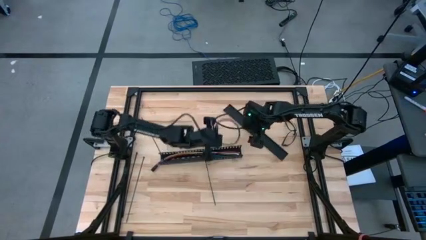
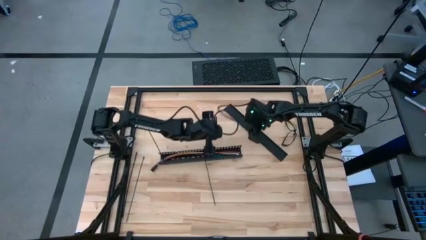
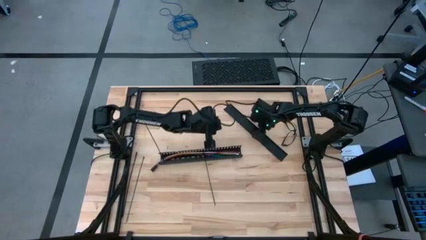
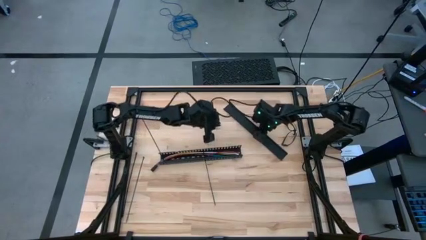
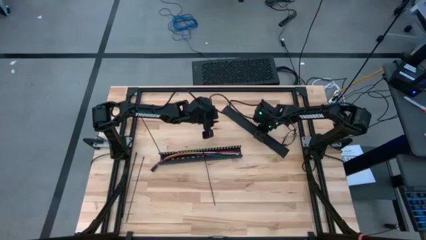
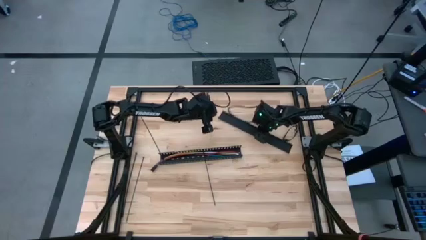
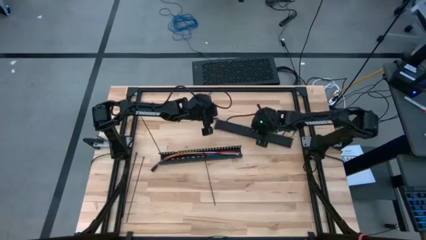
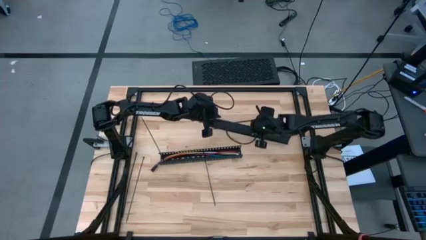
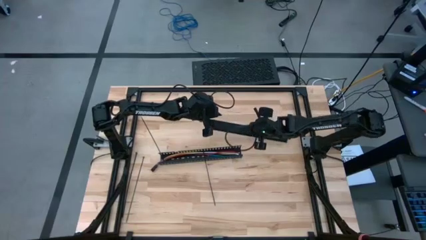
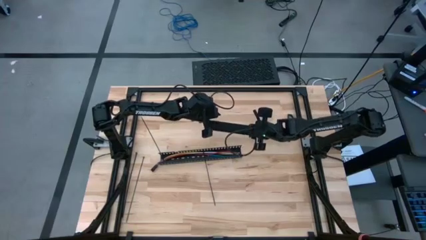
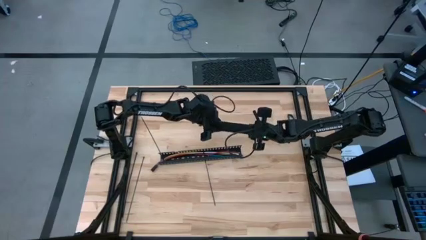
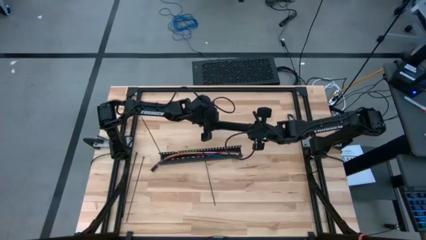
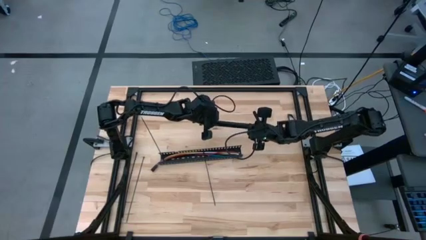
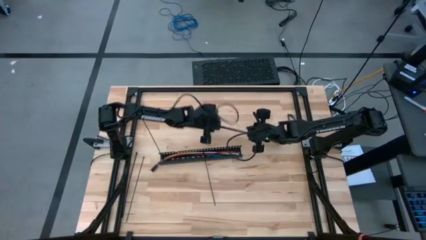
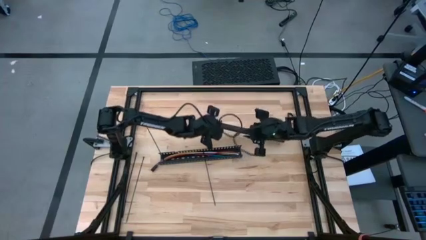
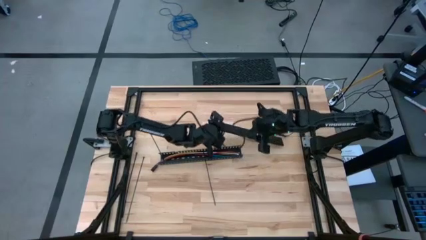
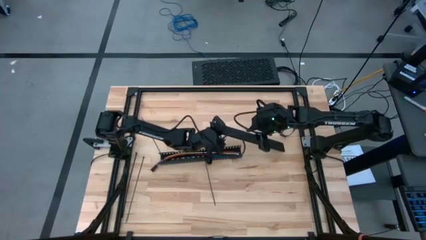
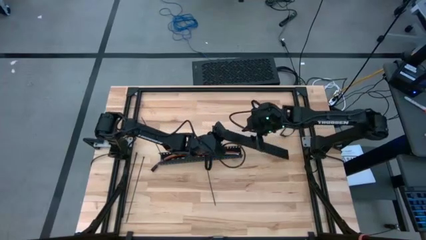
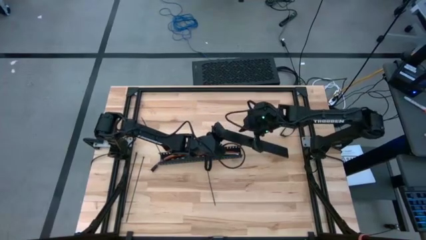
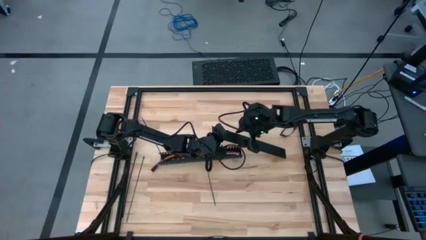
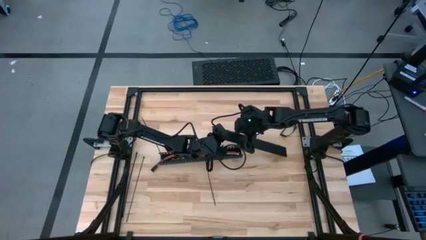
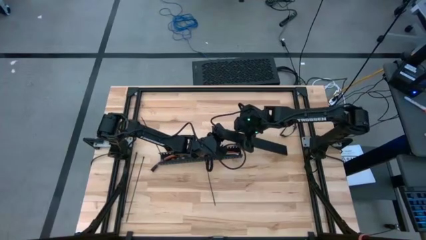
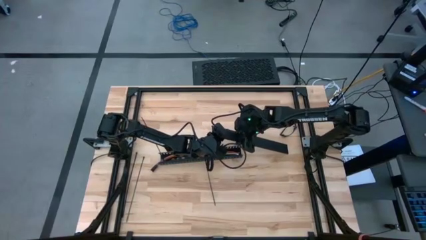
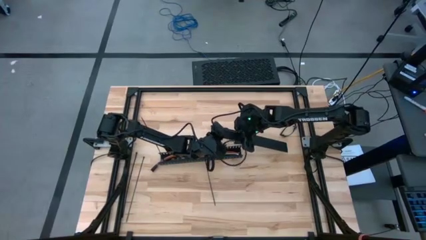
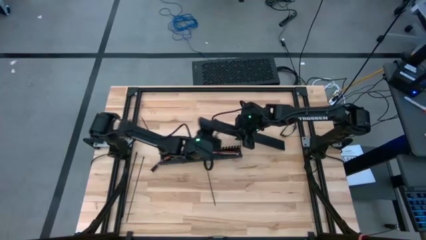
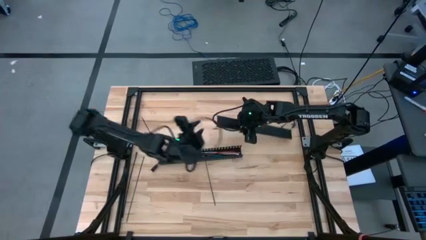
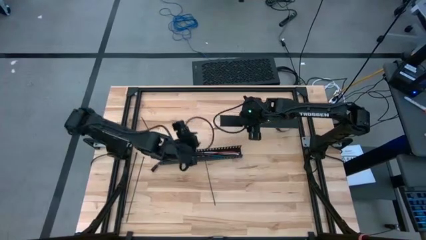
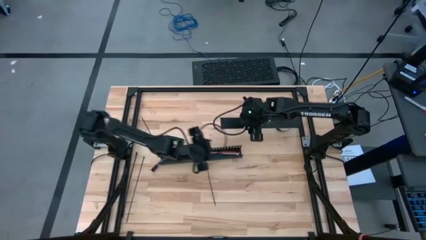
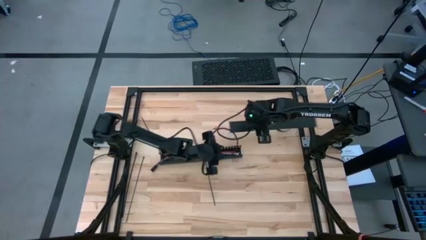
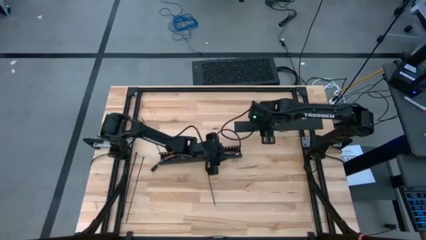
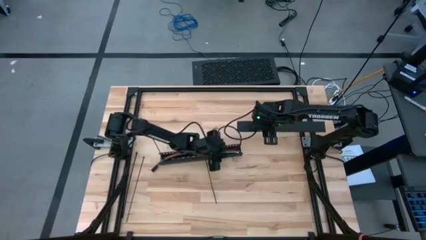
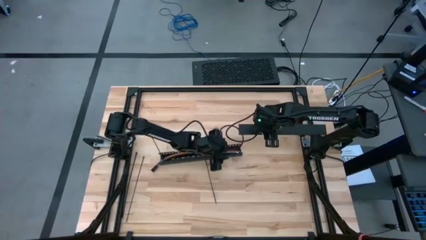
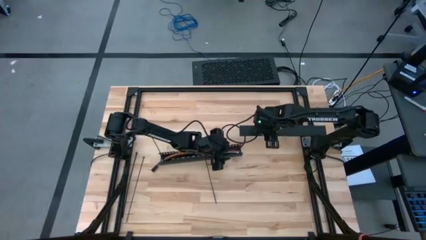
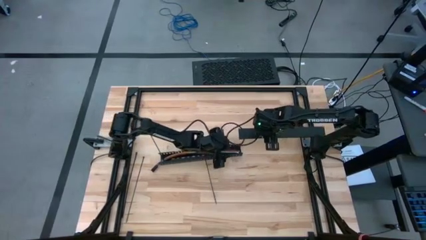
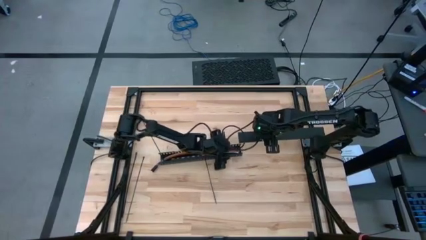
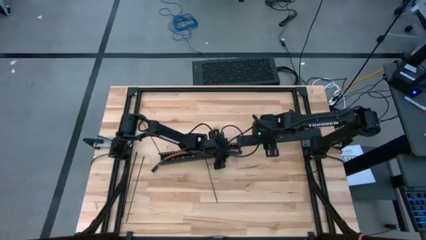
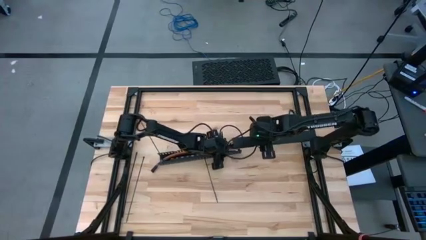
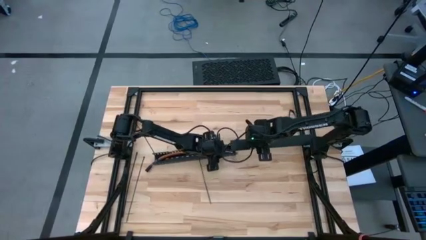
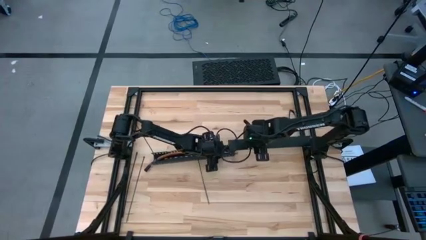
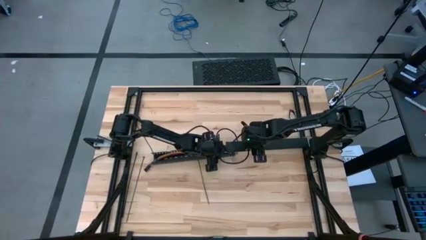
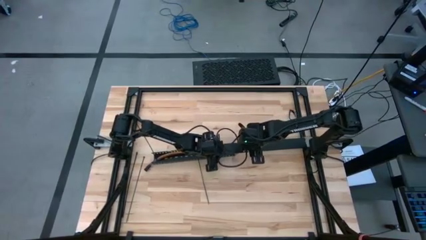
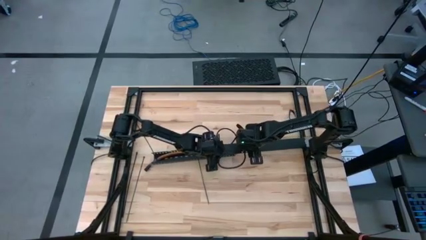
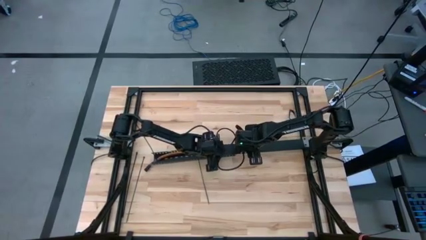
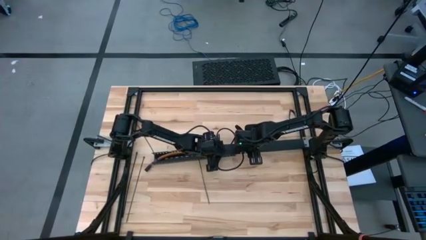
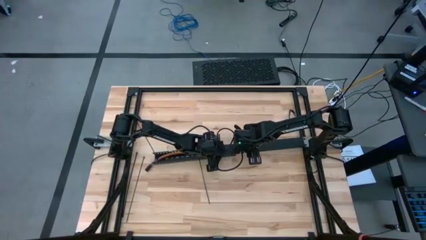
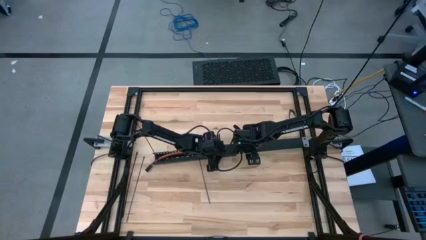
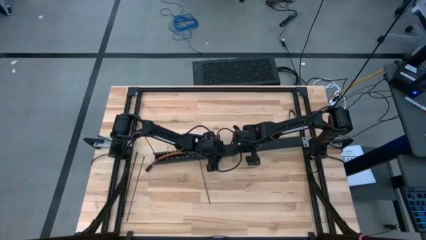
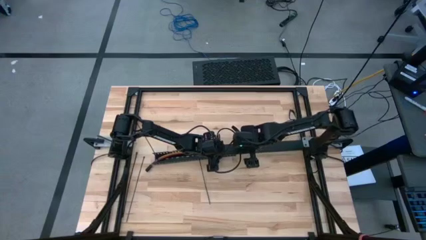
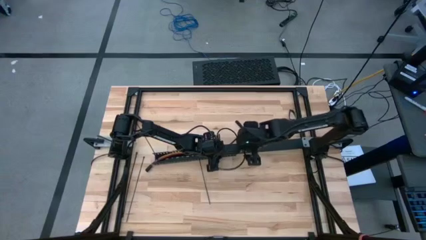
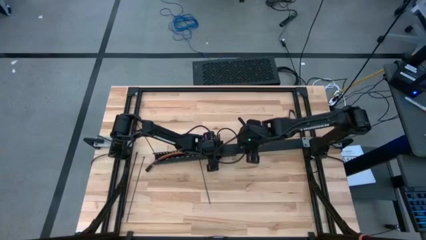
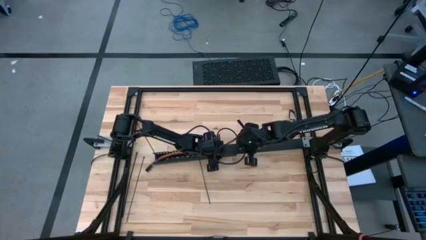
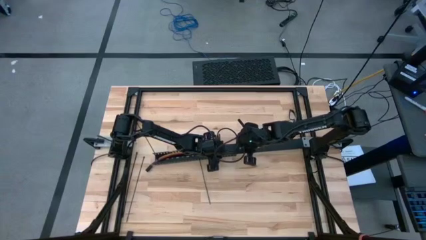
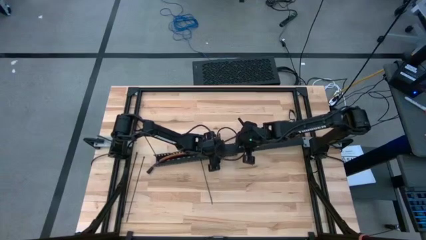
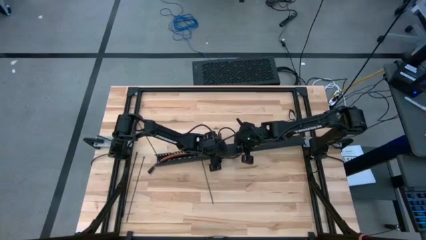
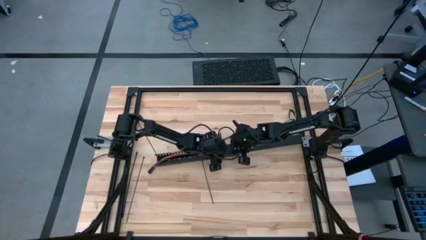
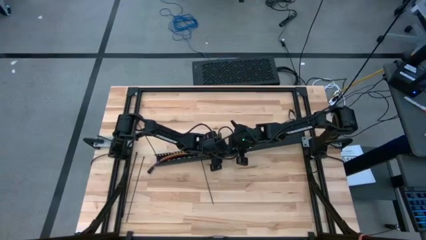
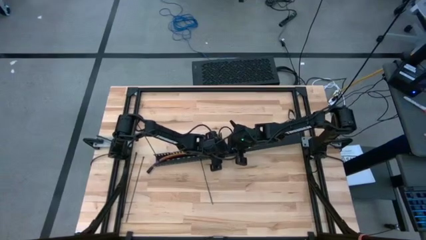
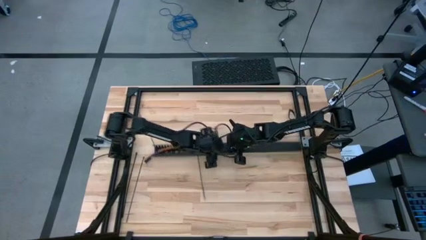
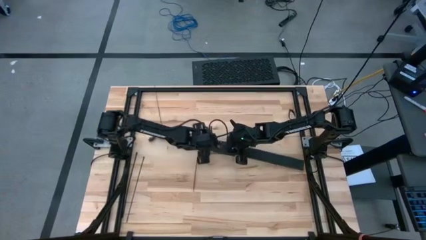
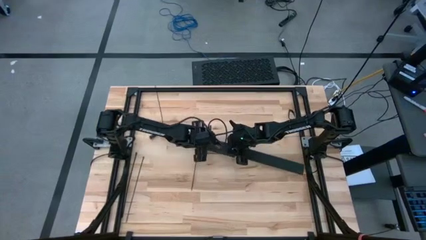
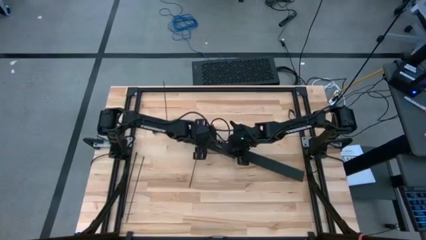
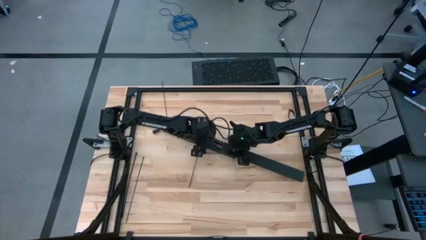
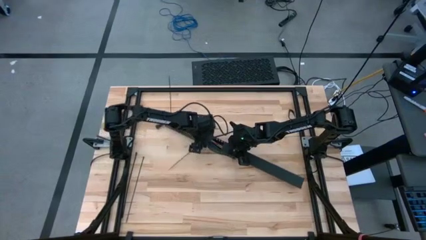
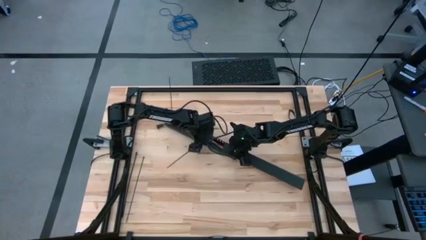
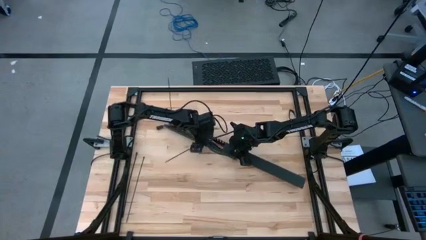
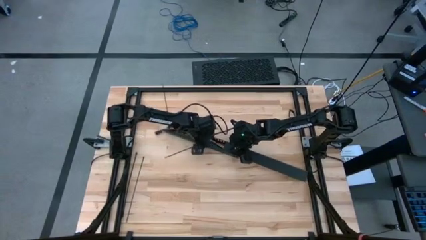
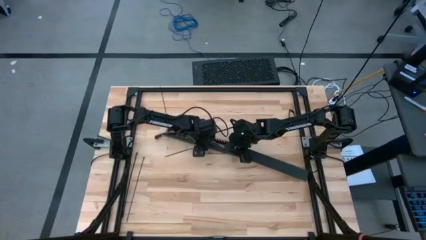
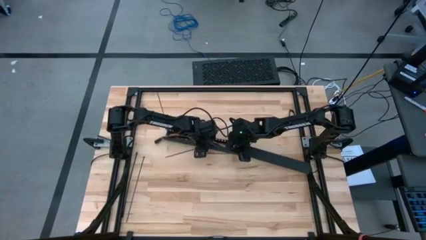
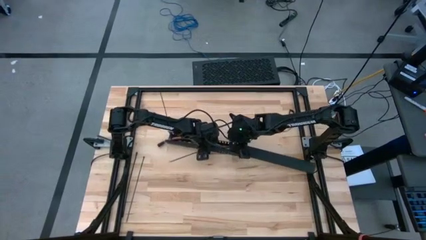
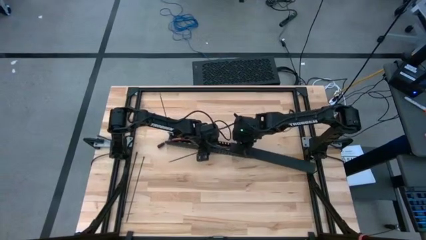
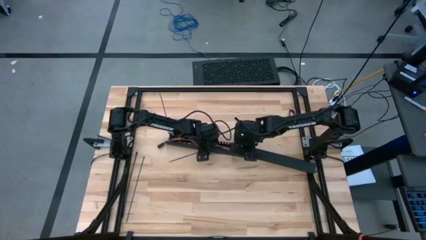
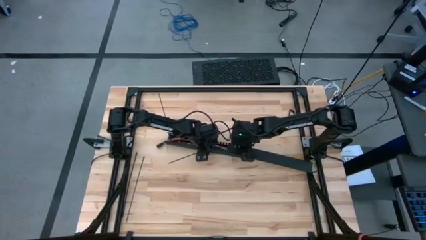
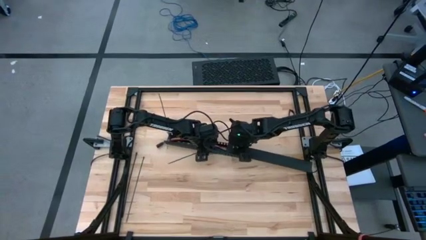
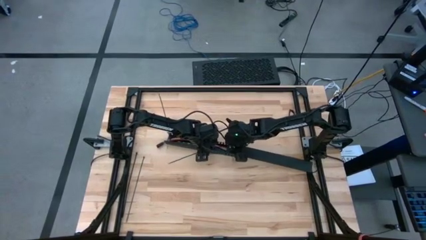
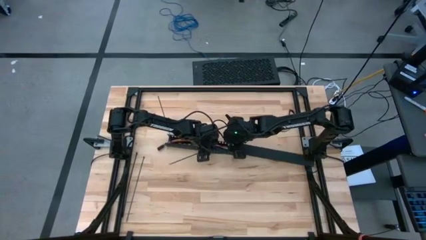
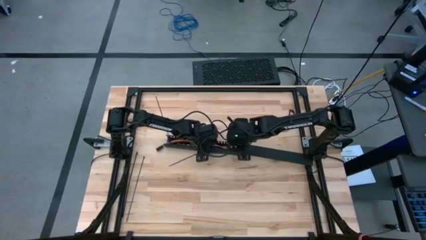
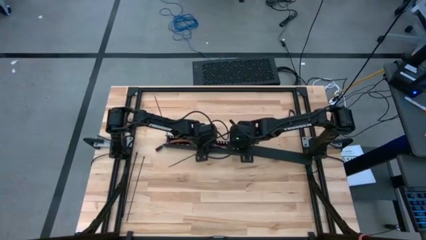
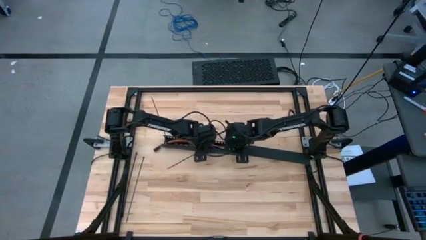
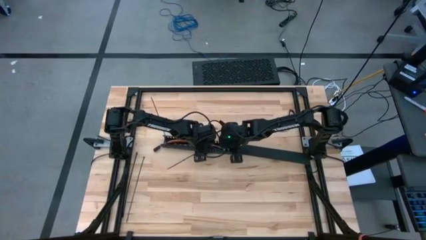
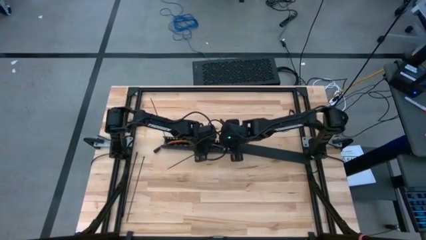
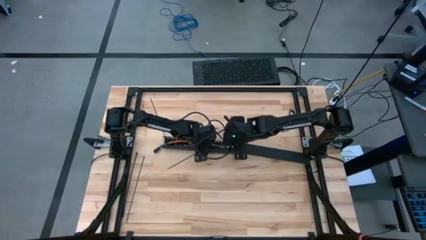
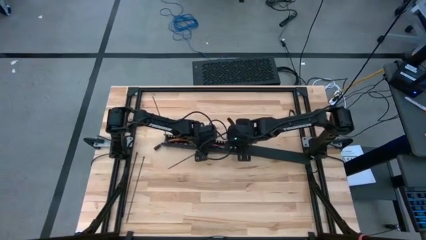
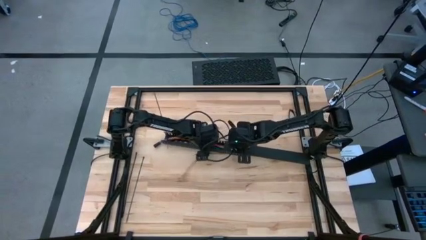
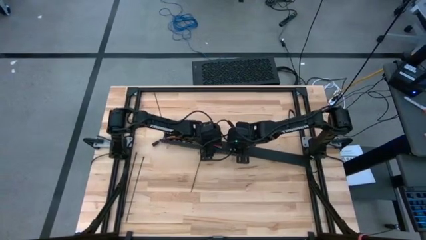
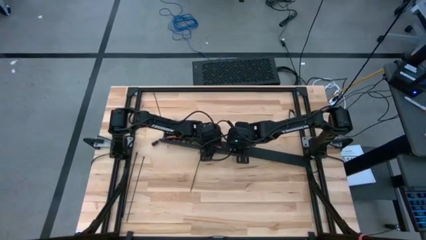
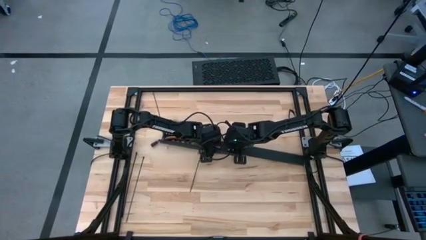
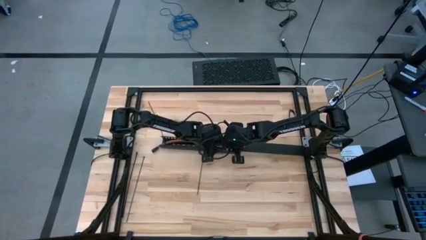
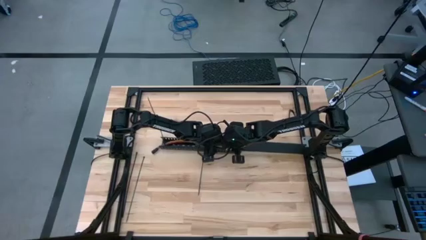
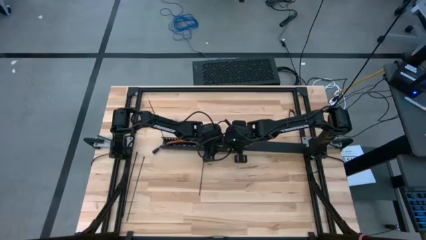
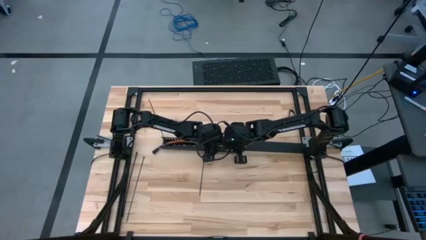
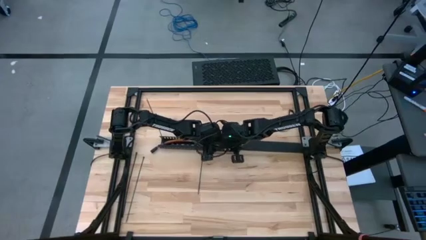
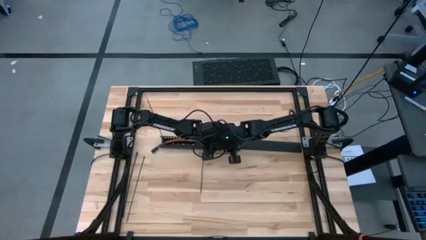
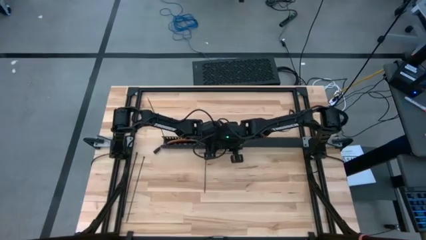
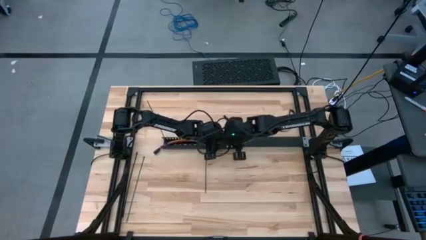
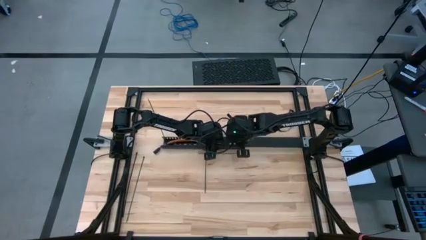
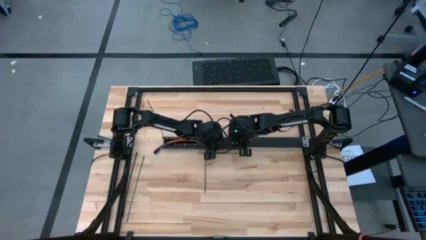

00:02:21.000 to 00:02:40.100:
Task: Ziptie cables
Insert the cover on the black cable duct
